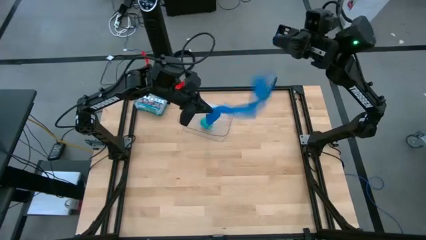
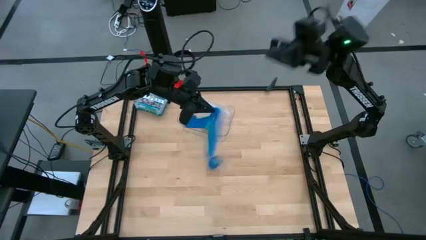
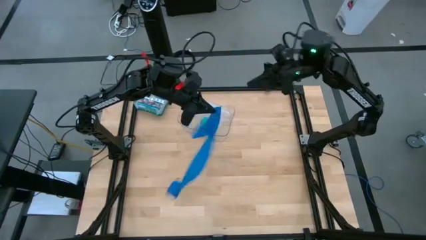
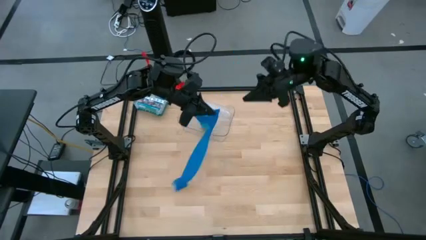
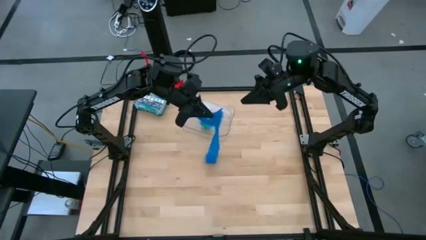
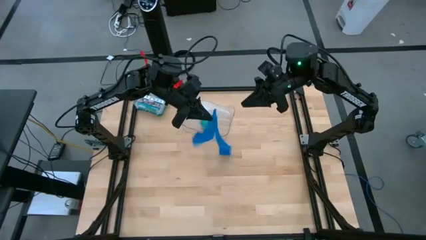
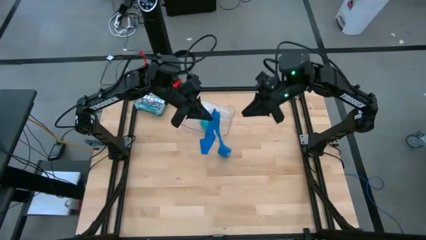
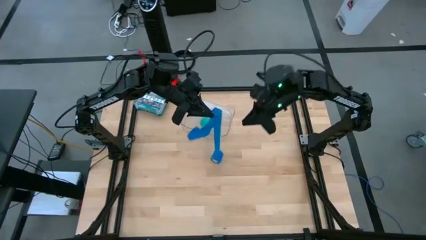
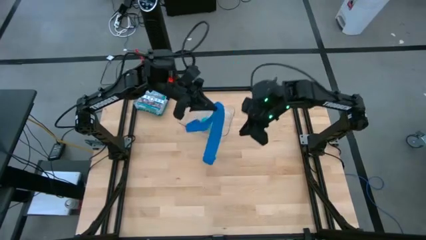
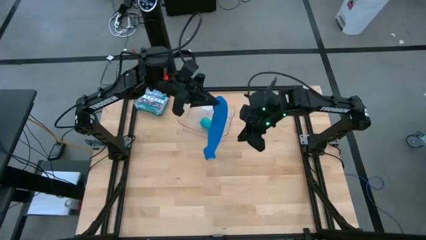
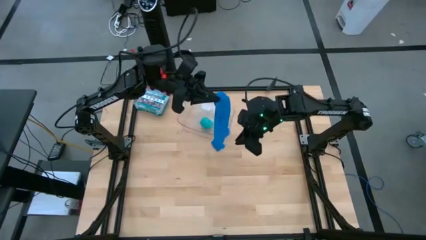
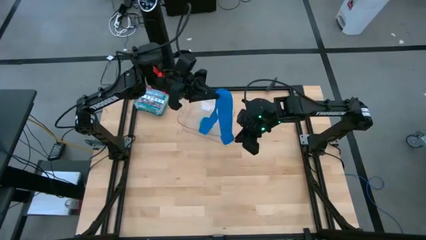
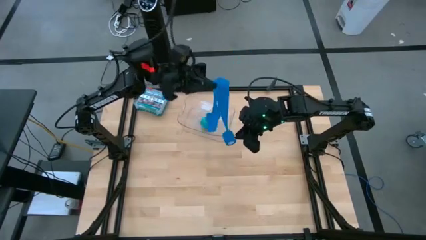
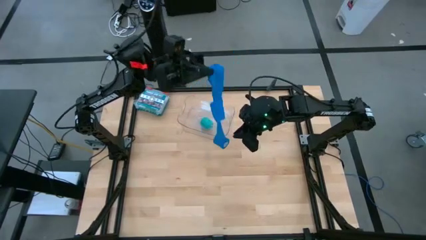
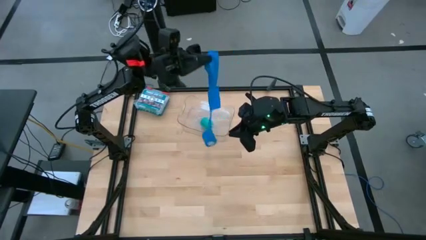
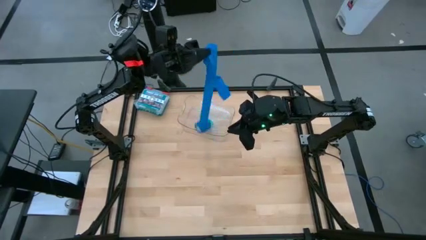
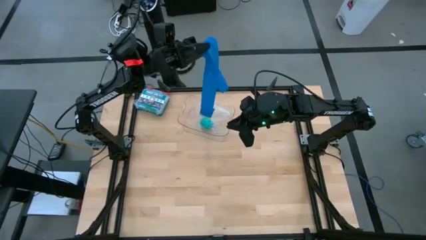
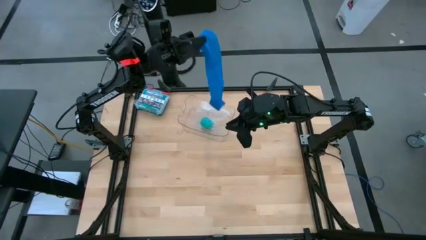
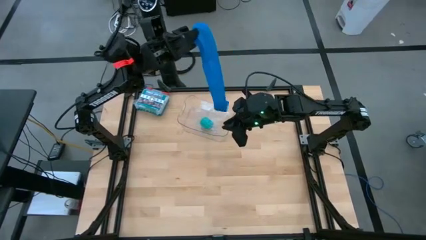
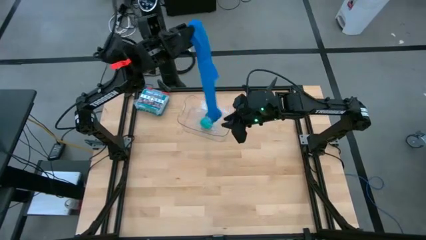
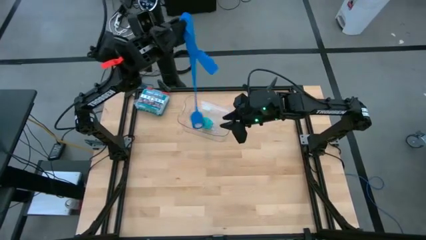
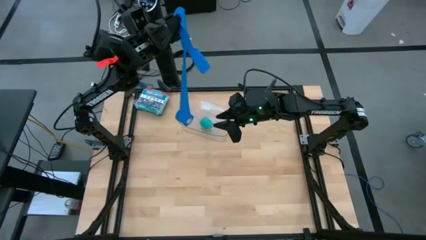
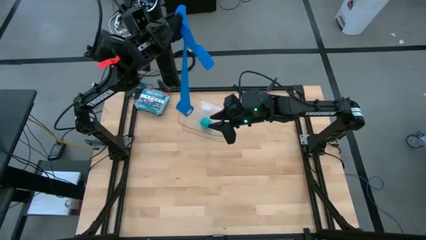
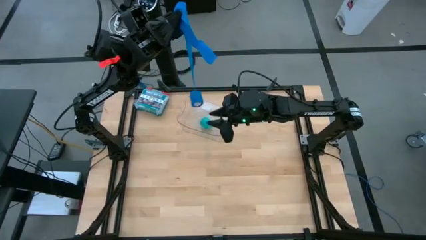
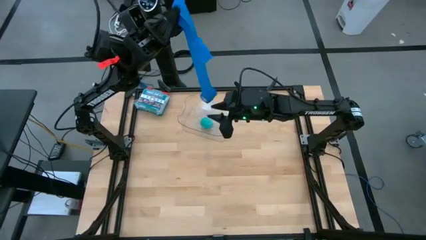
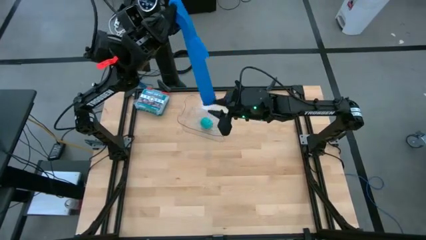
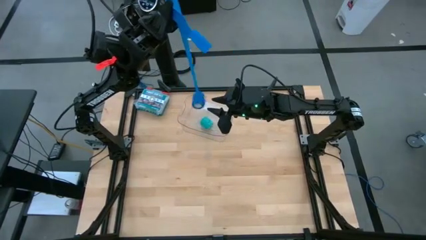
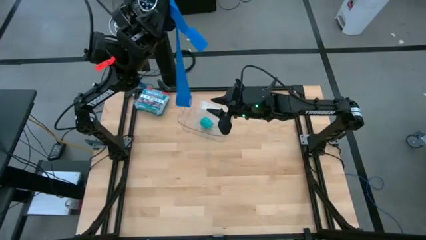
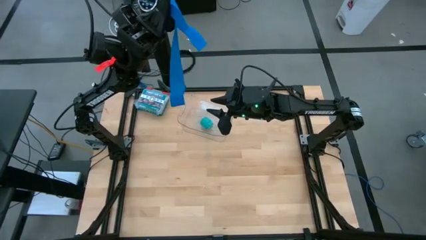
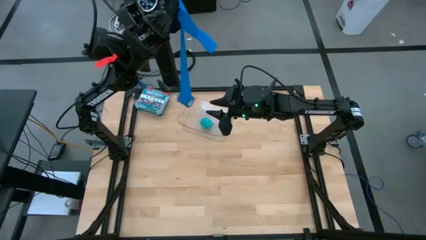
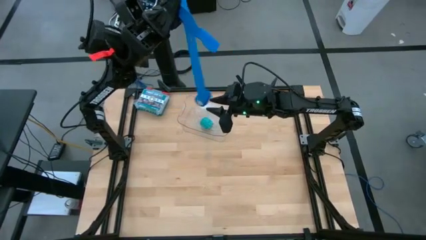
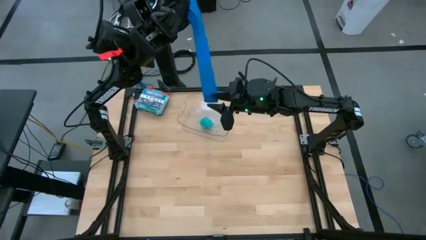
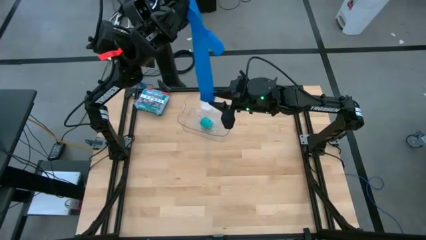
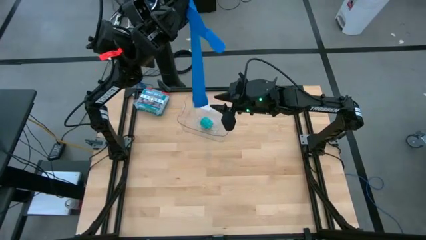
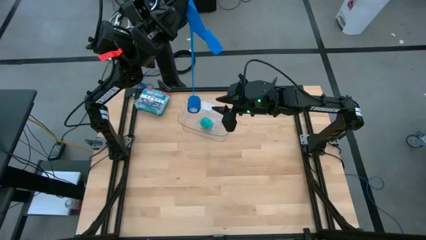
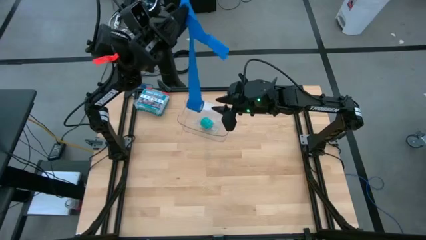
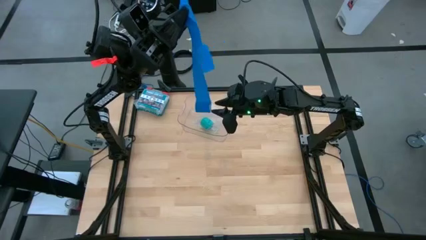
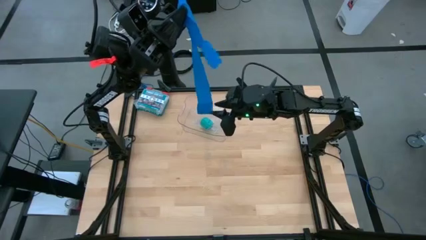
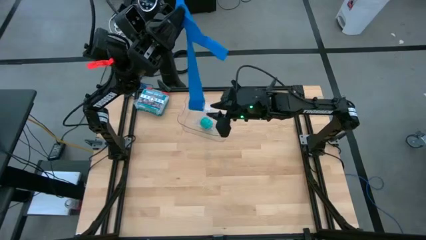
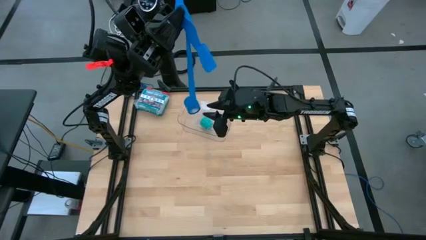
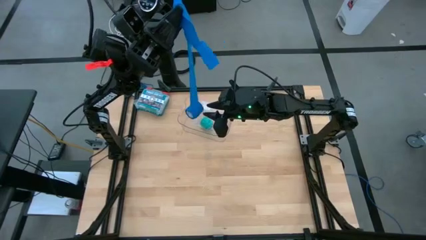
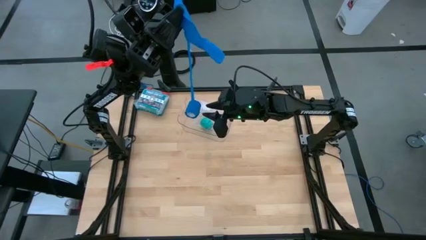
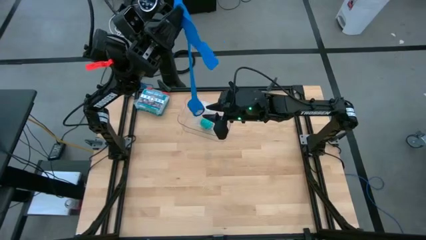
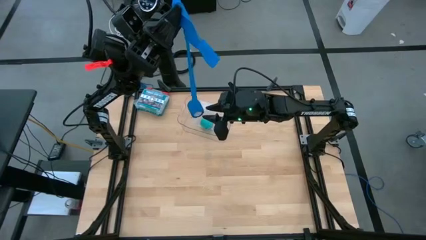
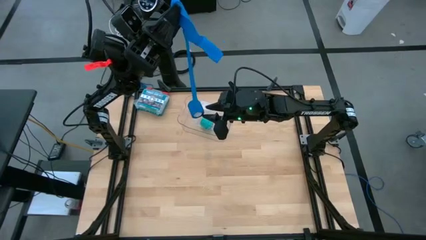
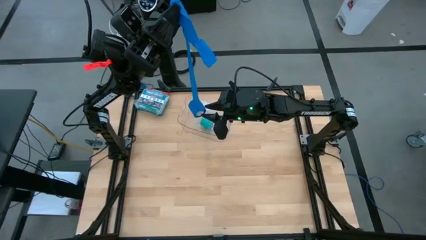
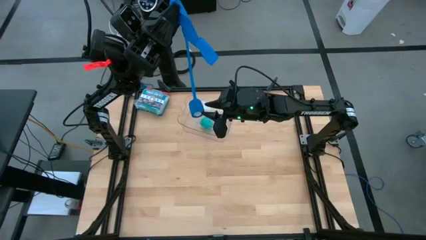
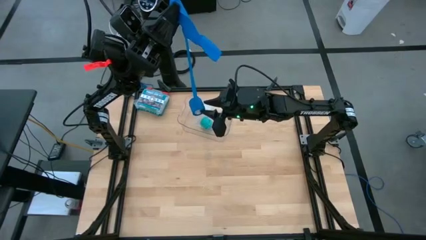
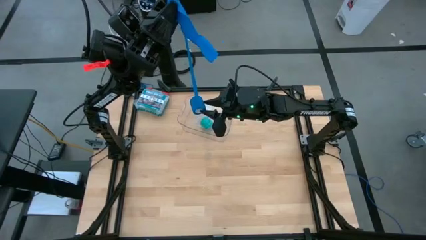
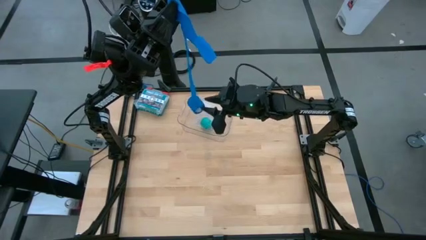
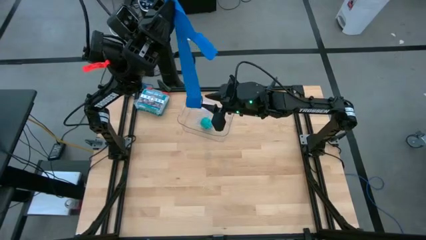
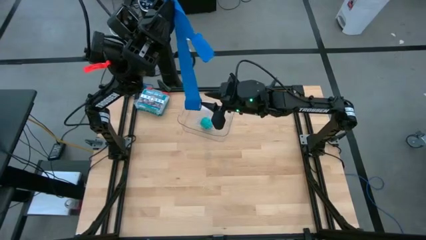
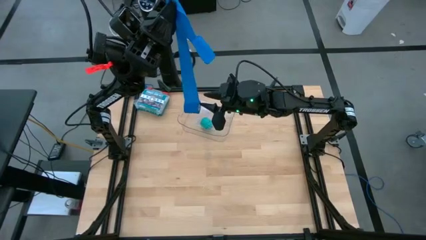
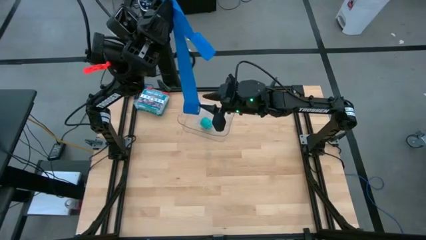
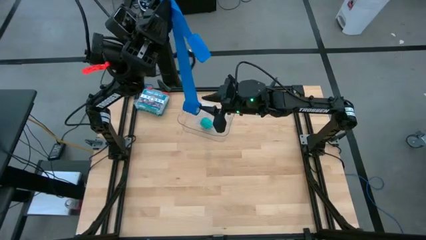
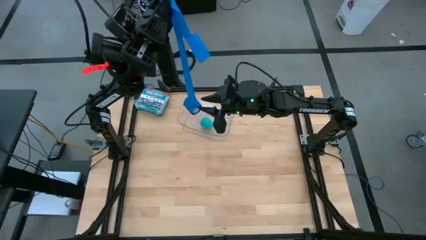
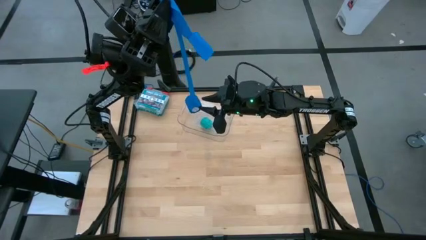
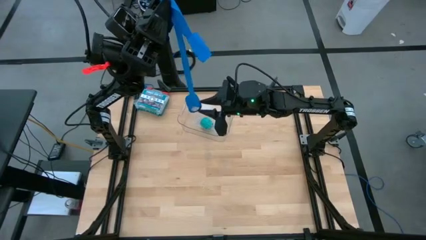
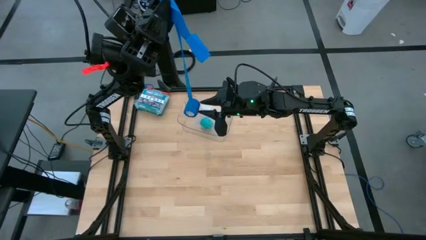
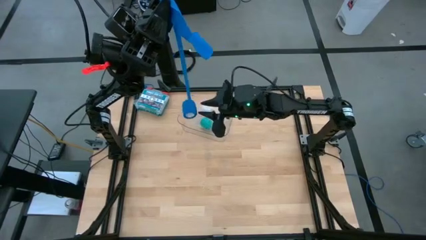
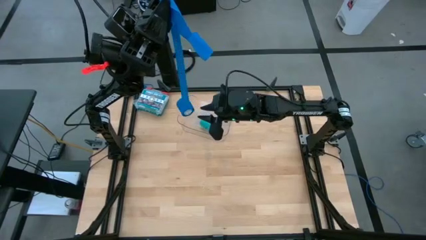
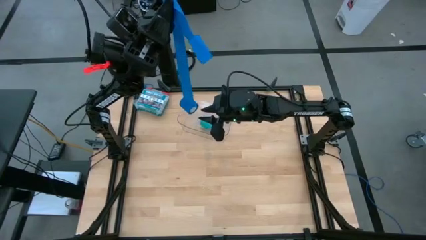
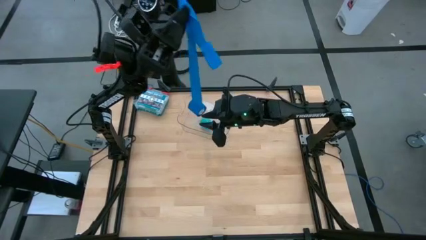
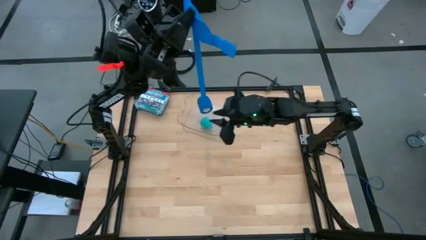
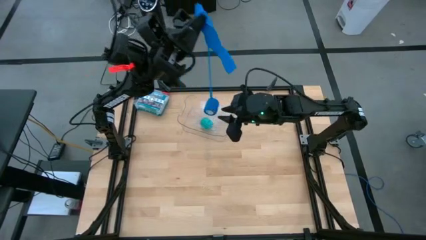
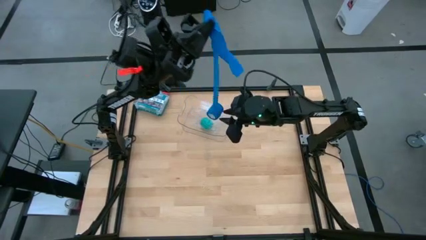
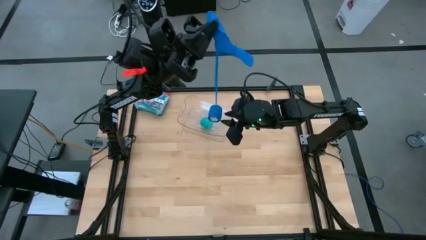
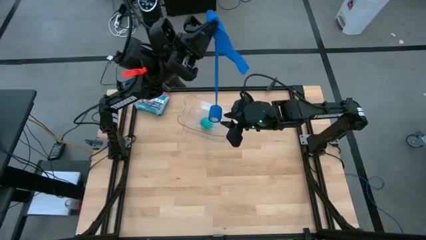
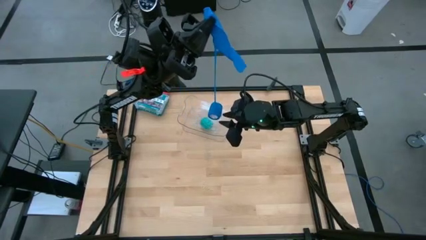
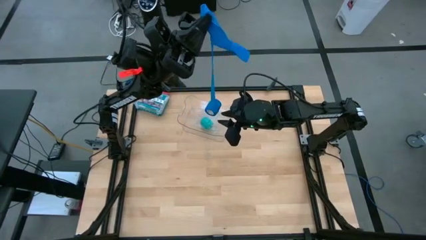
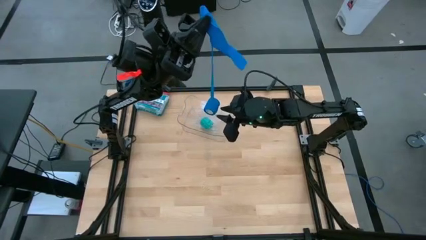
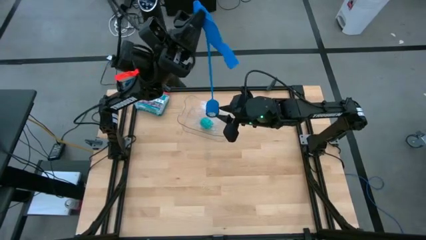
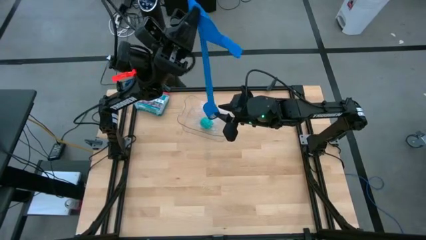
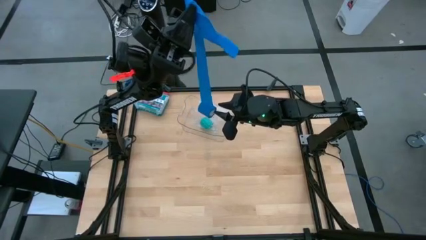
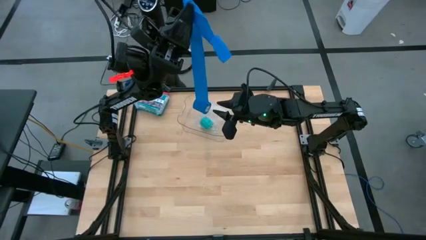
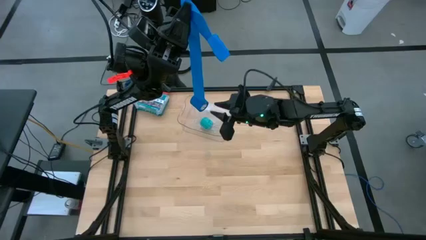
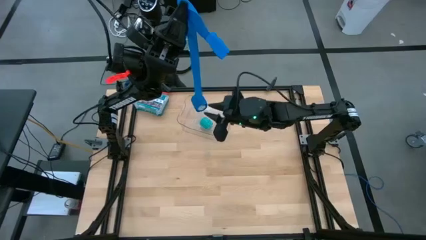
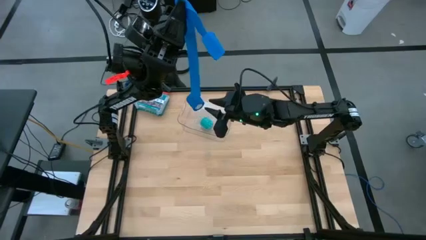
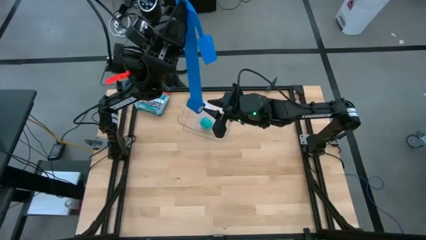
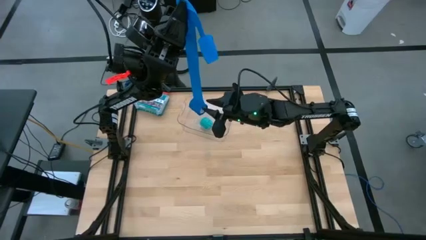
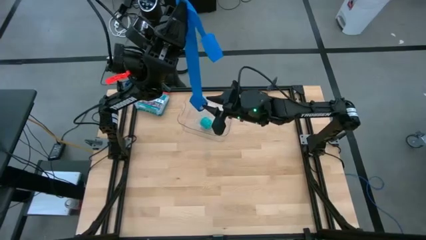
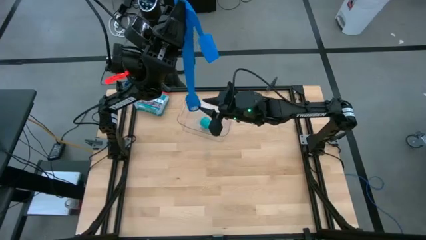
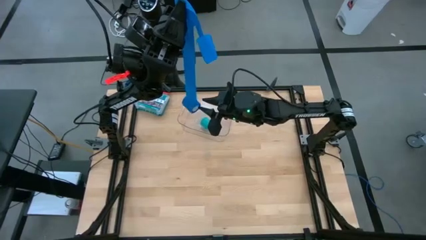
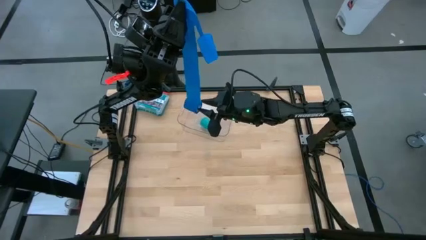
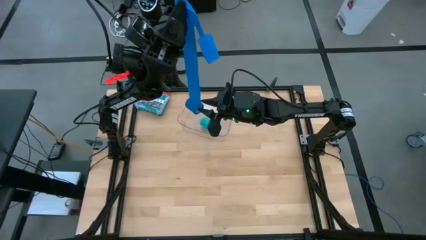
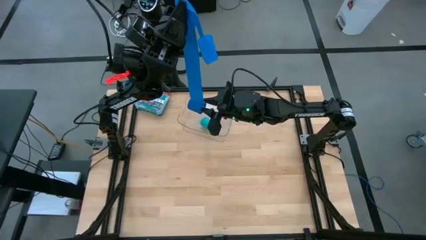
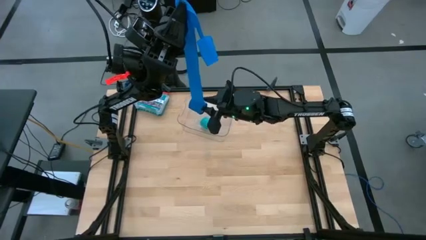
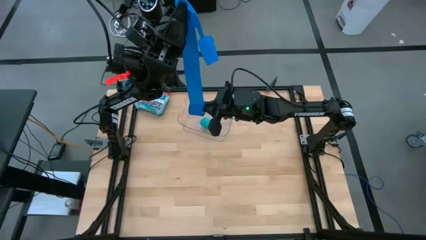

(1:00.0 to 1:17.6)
Task: Roll bandage
Roll the blue bandage
